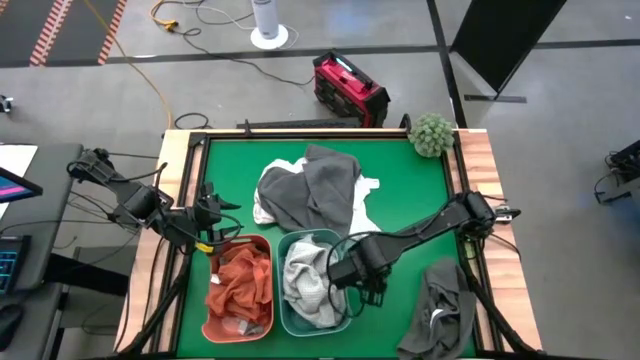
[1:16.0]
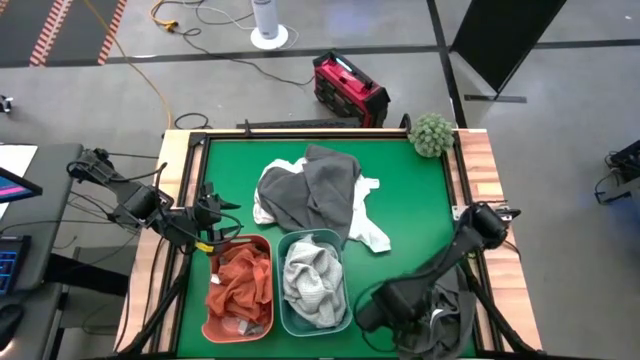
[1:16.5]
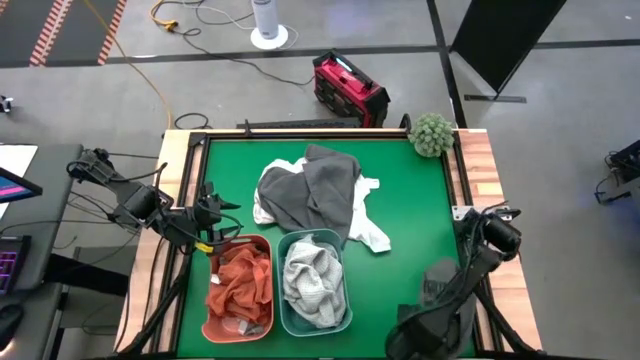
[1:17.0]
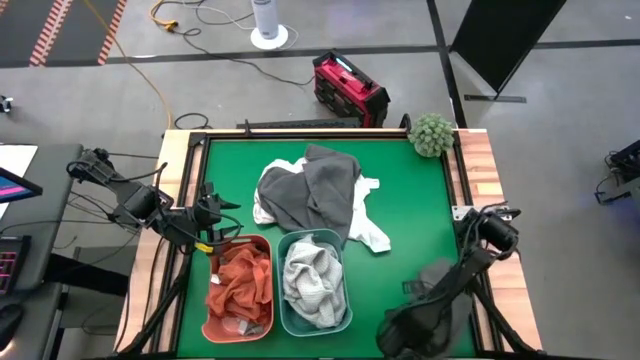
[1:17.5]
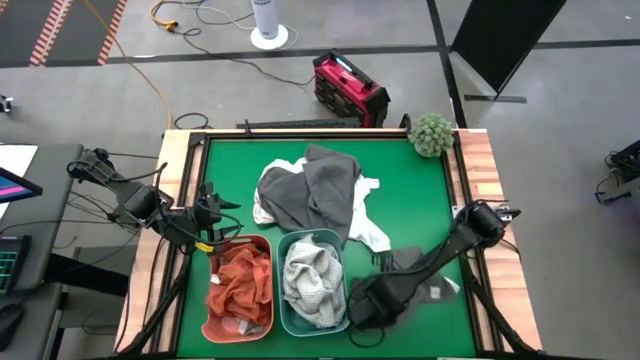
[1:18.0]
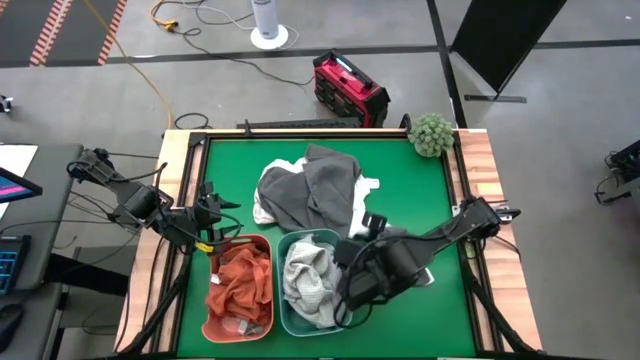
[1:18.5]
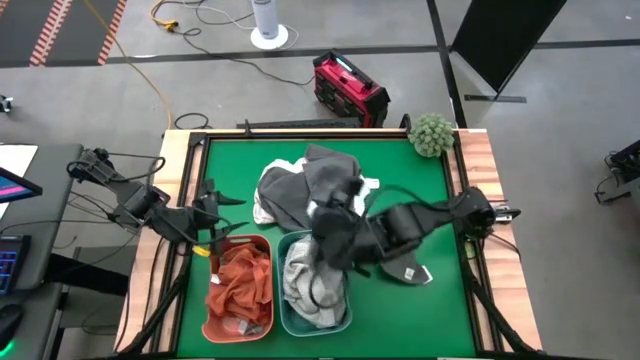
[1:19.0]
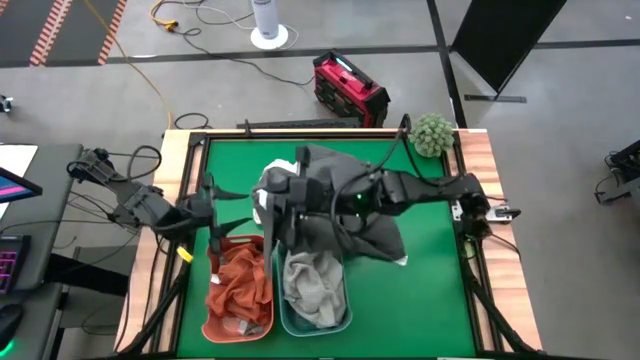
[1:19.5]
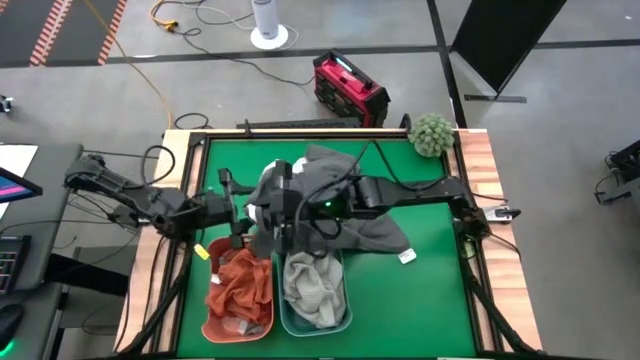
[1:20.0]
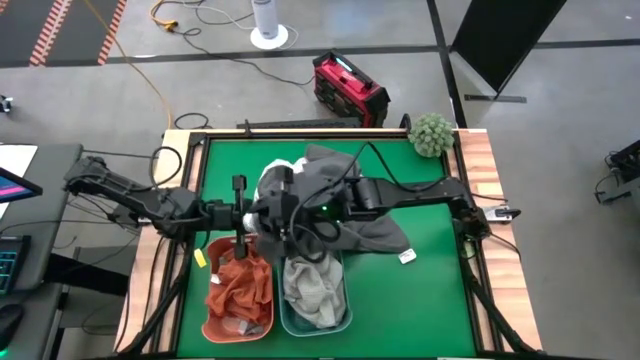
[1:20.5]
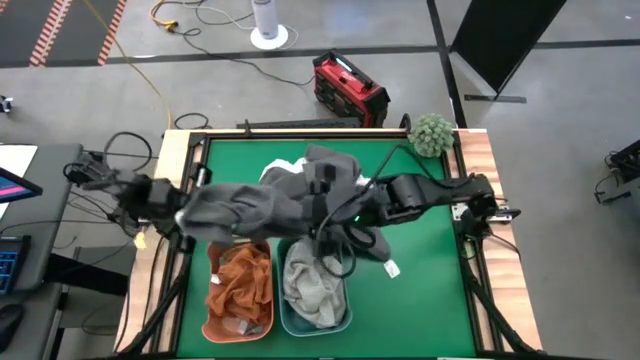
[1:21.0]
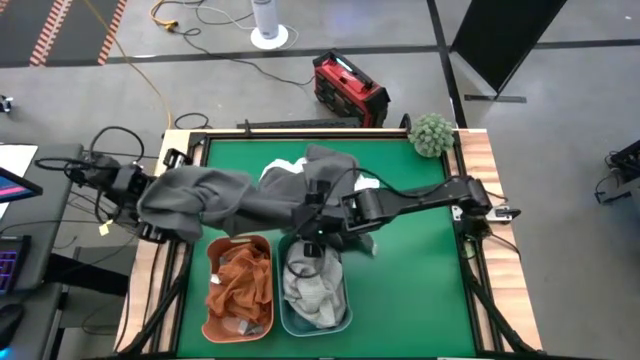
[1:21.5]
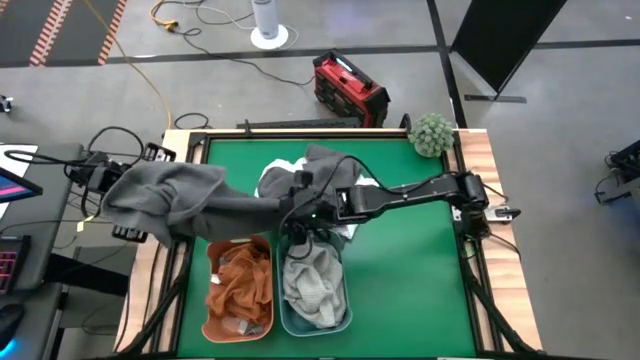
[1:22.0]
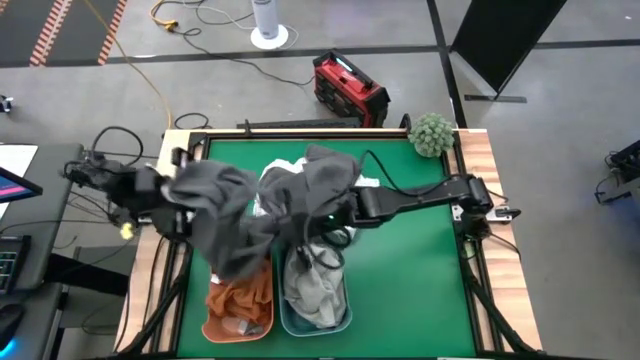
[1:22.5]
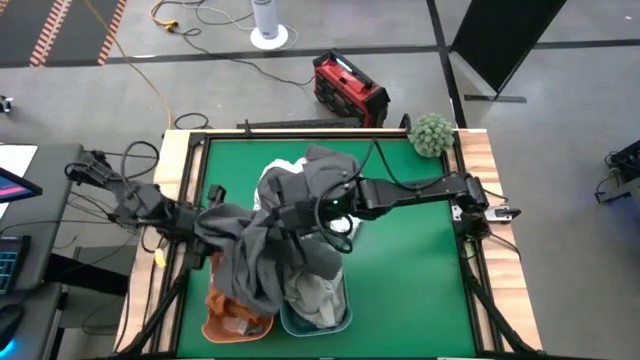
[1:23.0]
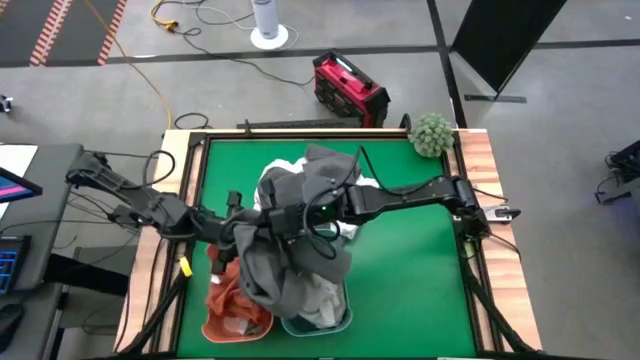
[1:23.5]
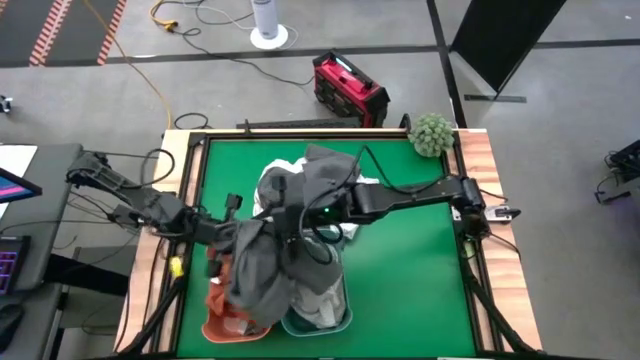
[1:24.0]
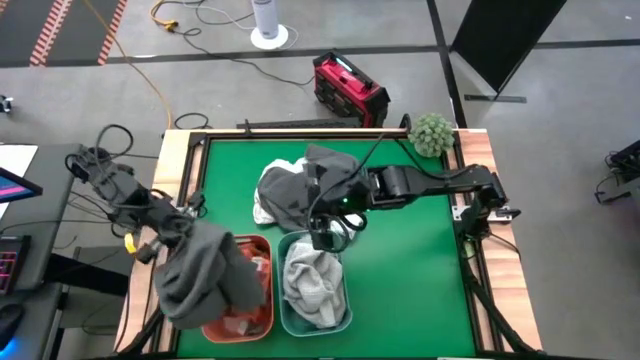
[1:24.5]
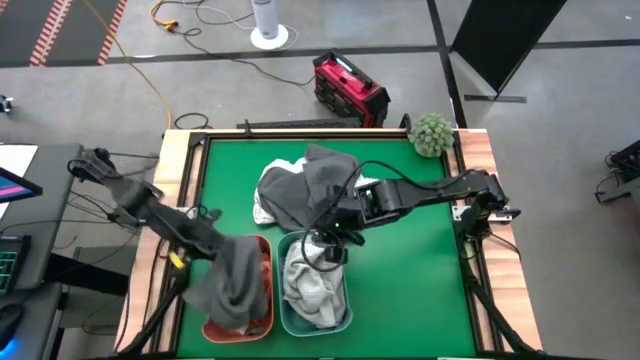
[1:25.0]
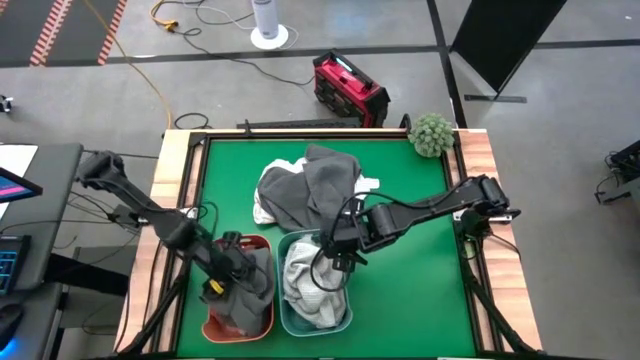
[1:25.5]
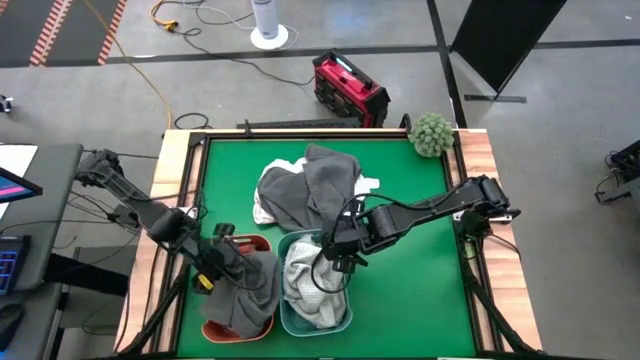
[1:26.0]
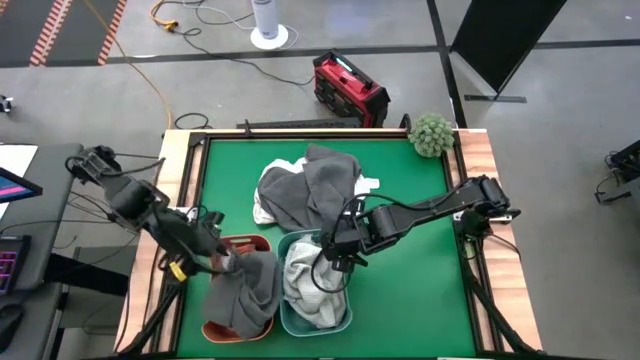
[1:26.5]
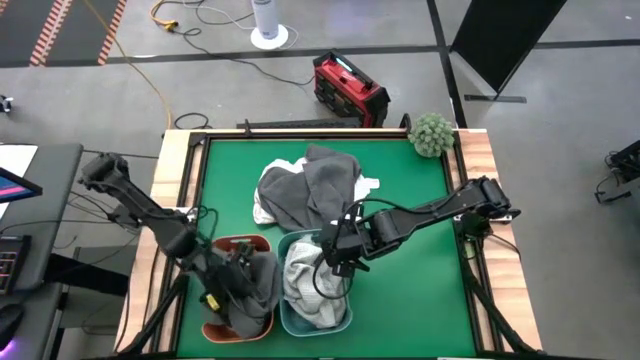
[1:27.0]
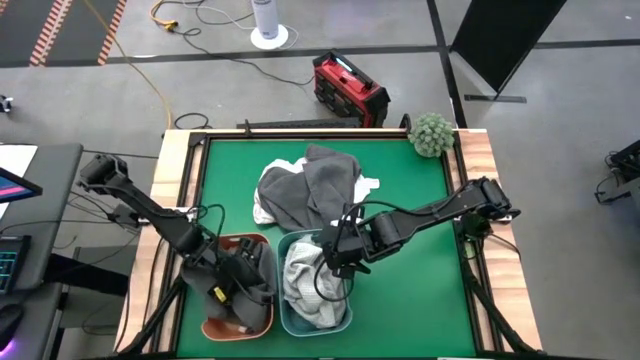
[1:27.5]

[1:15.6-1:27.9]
Task: Sort towels by color in basket
Put the bottom black towel into the orange bin

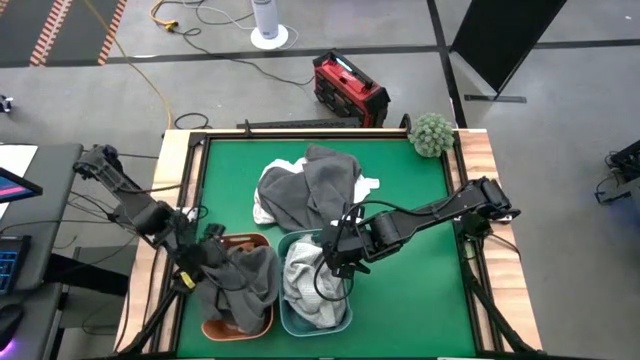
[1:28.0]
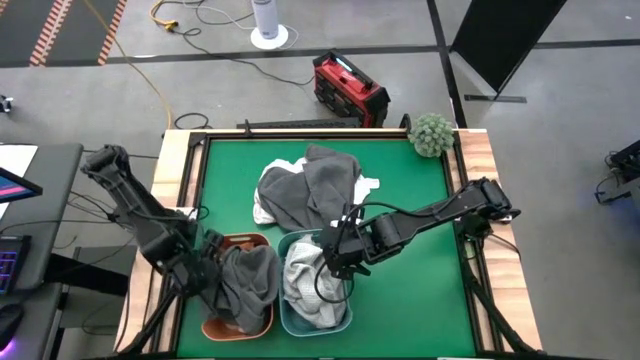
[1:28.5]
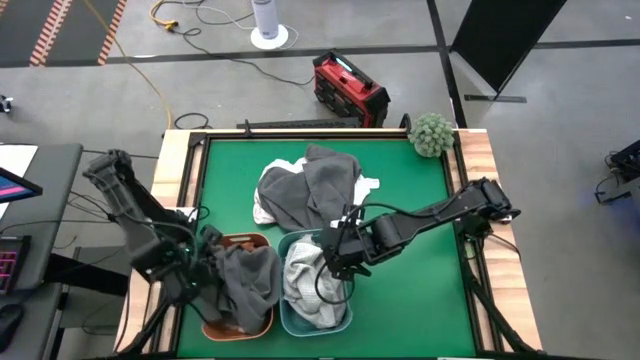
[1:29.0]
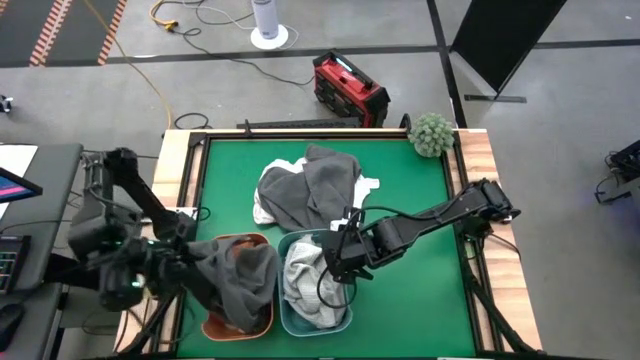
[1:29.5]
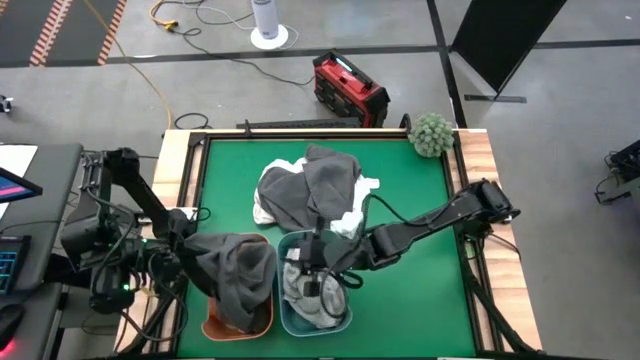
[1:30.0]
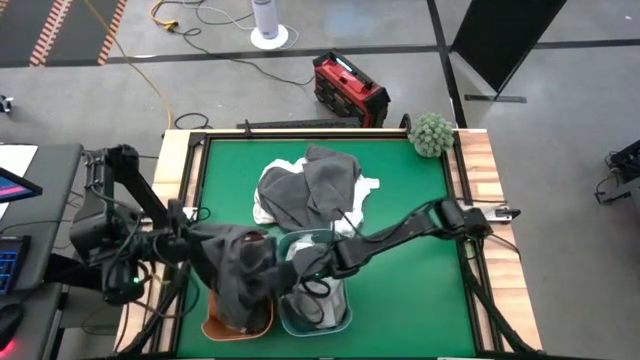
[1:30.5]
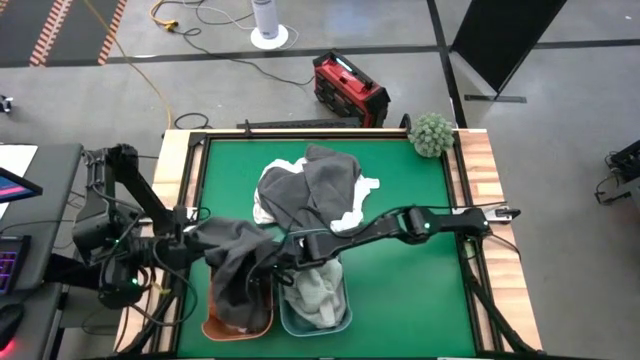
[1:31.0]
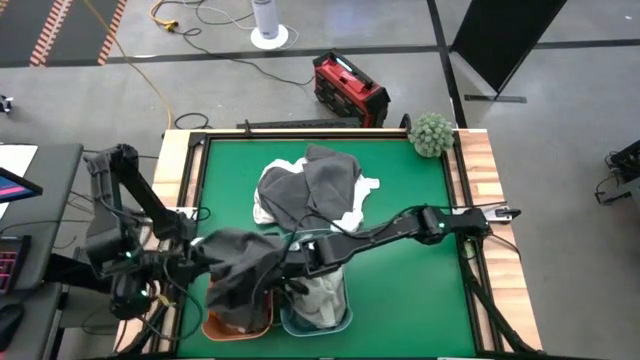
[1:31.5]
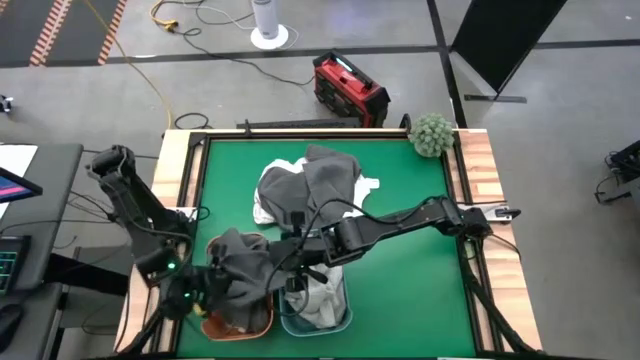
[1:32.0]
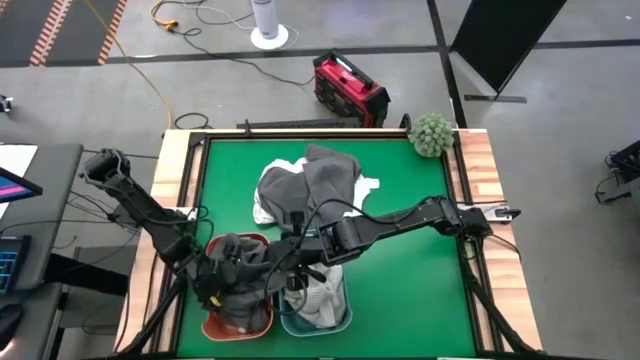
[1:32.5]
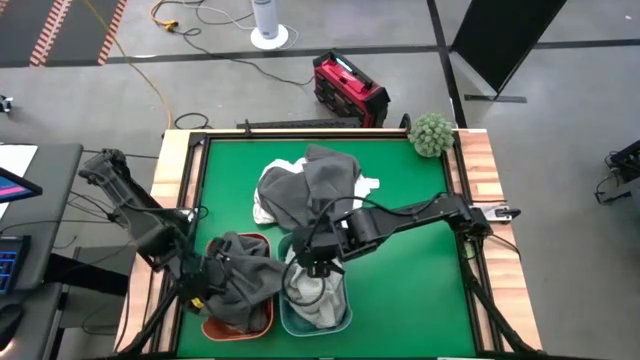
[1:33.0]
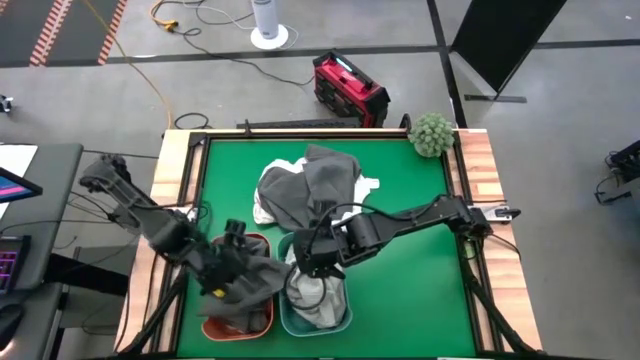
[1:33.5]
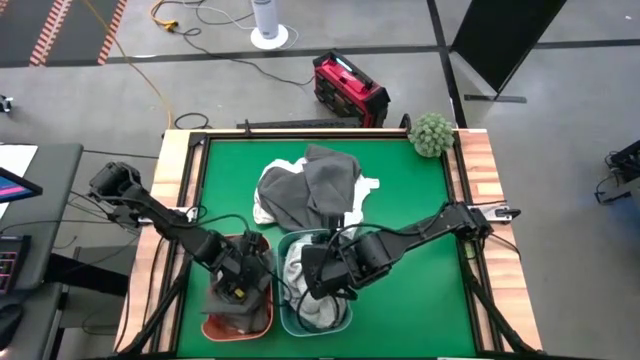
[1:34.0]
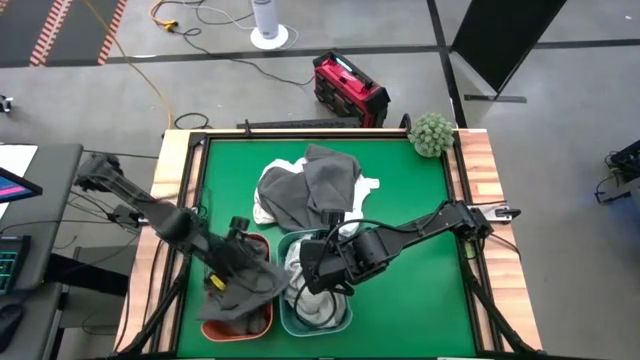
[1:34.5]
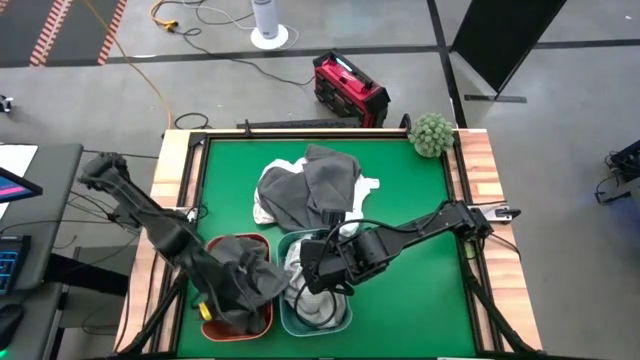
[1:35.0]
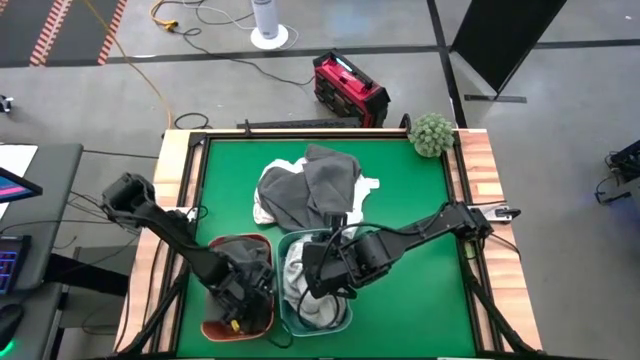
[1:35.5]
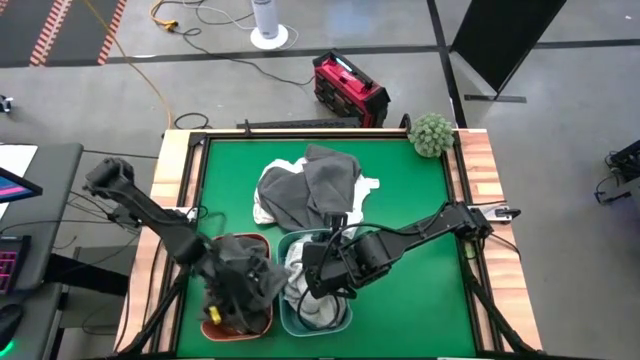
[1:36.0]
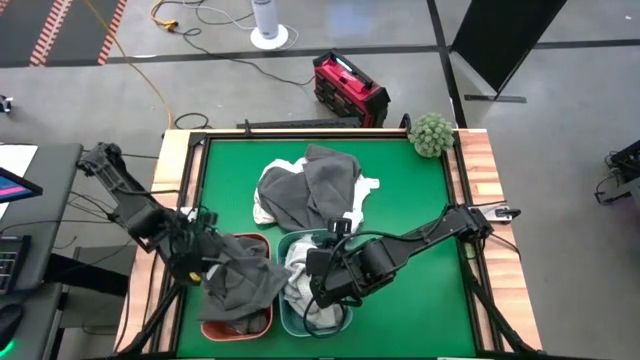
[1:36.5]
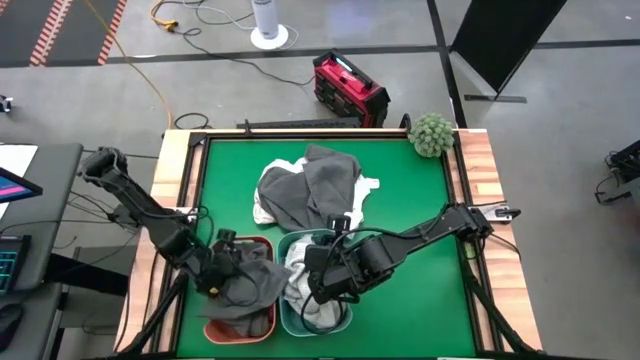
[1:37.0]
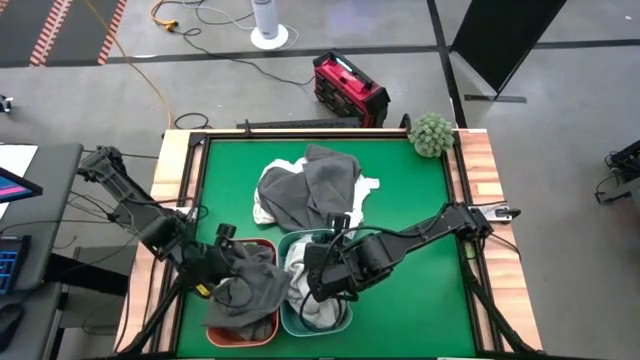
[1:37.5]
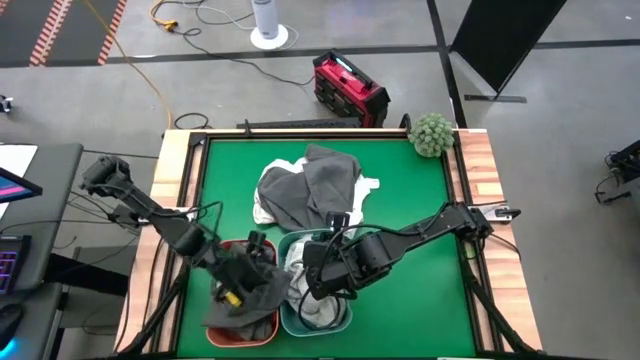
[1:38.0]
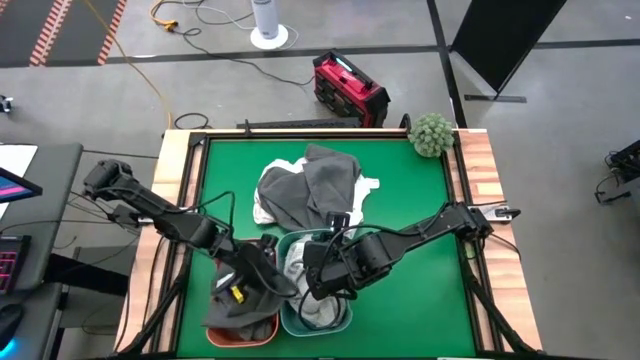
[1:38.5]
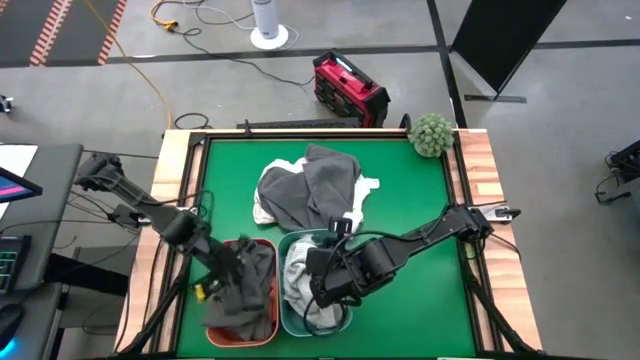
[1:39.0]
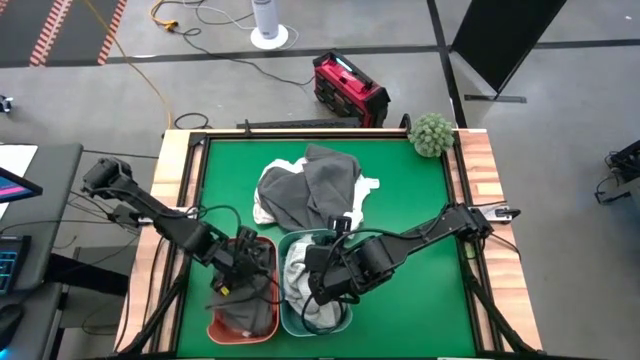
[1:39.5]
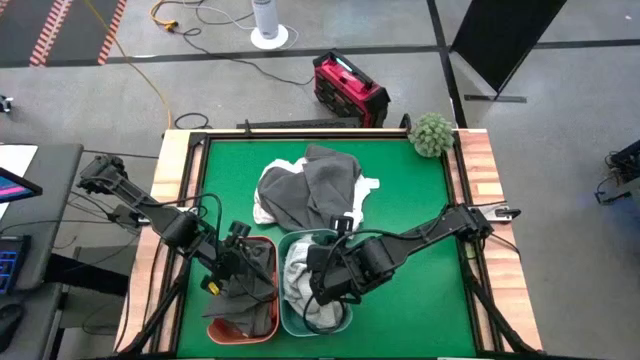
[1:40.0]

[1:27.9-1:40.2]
Put the bottom black towel into the orange bin
